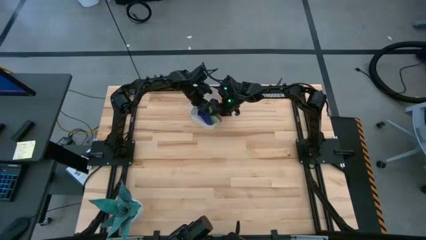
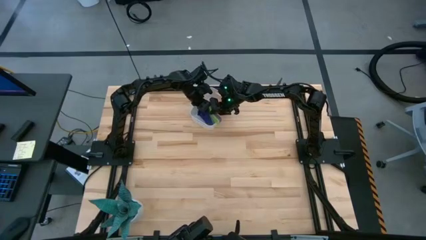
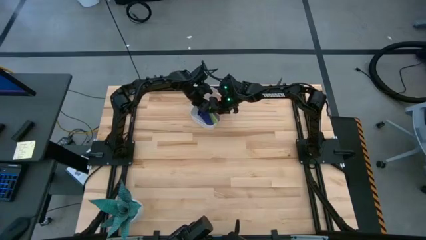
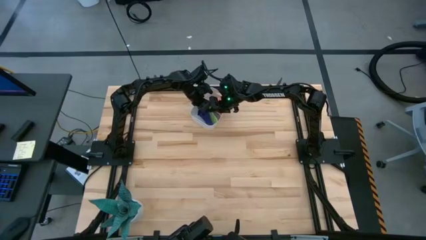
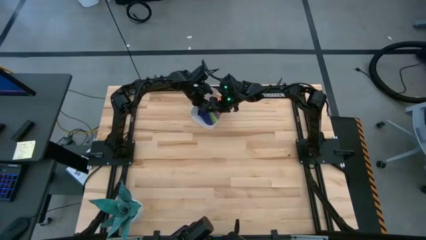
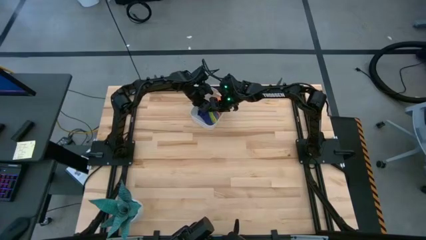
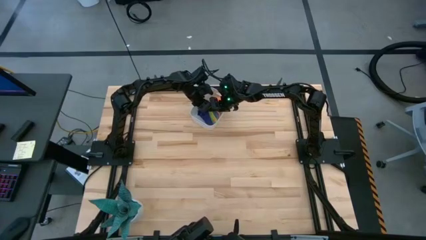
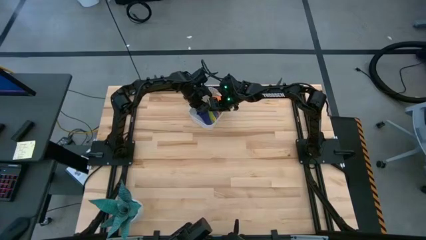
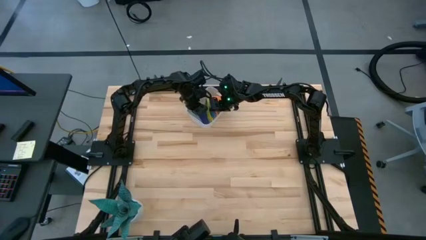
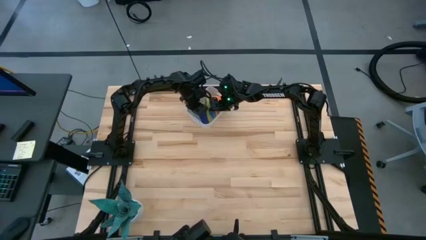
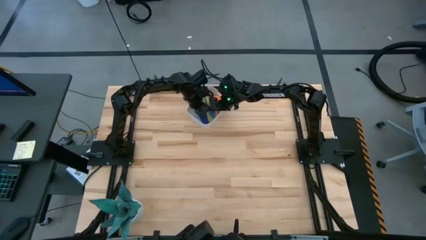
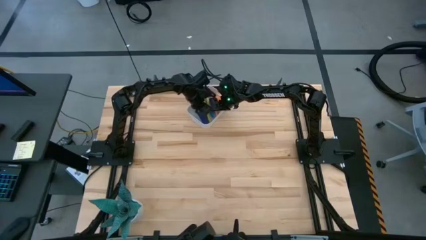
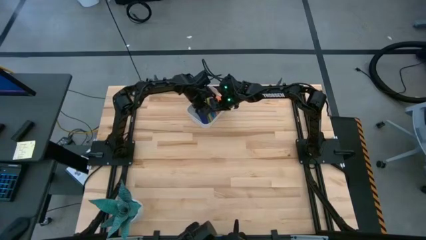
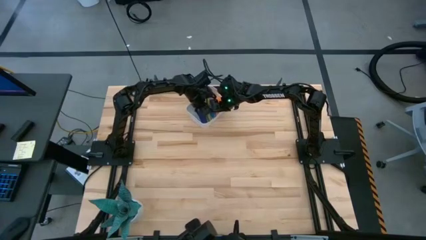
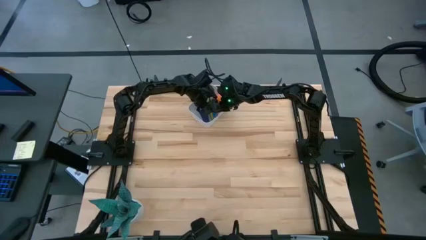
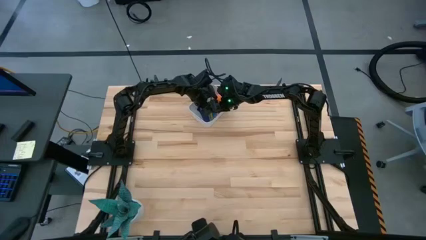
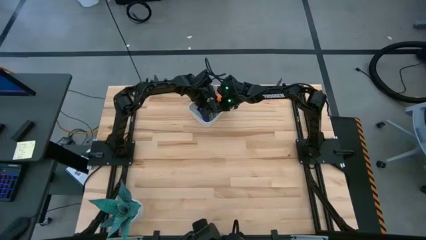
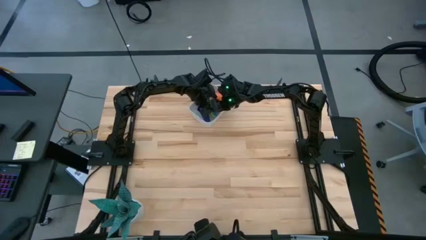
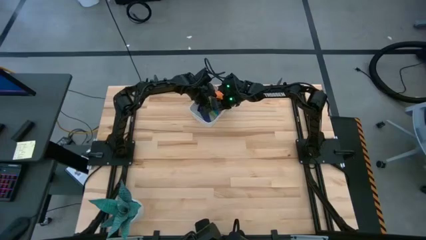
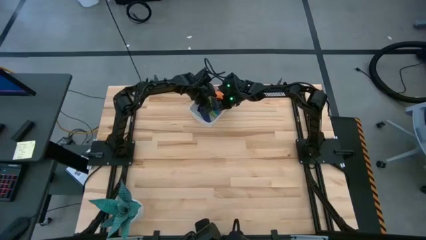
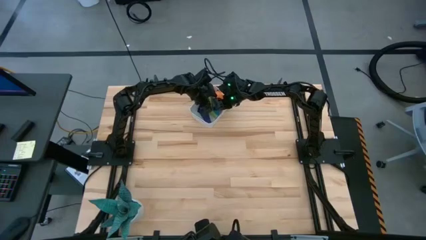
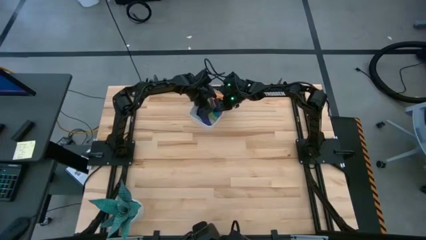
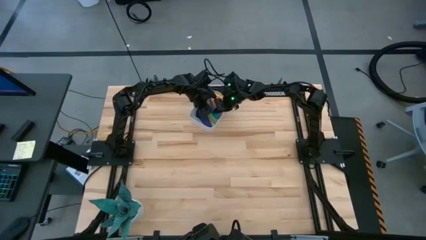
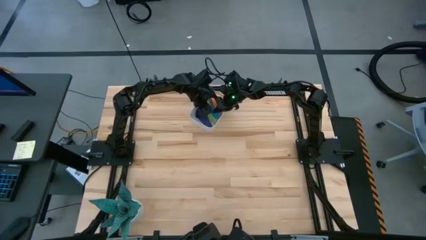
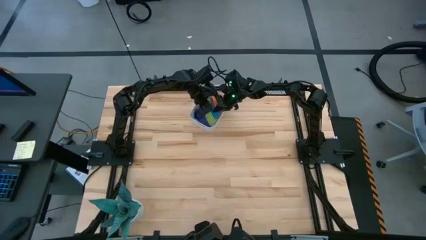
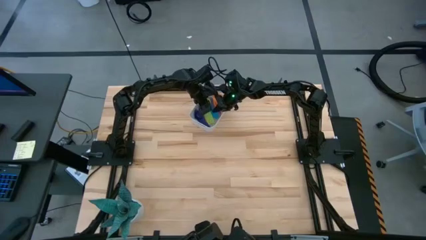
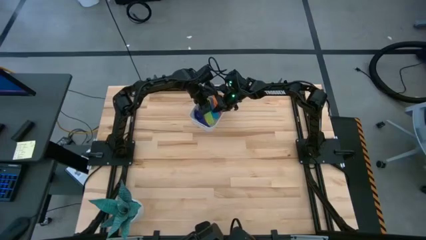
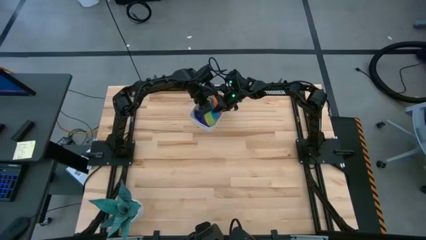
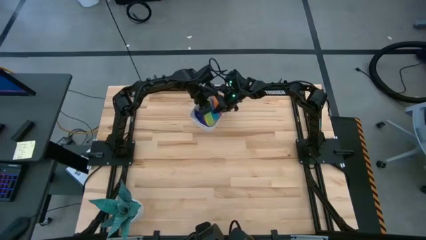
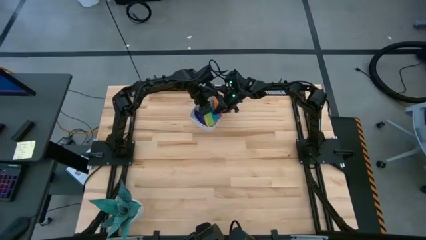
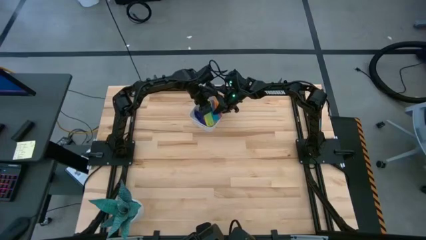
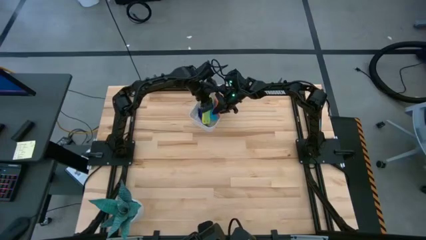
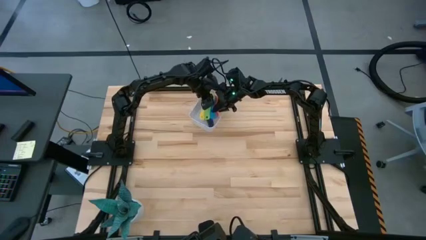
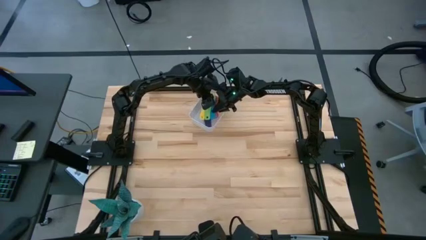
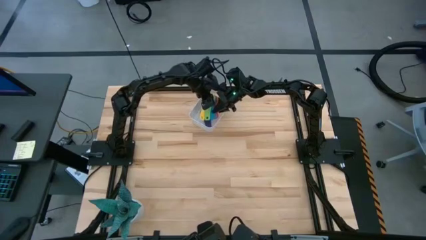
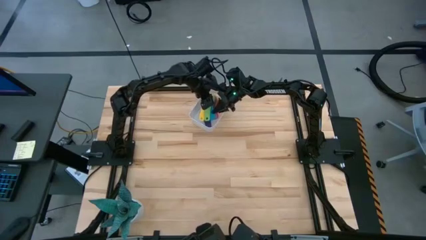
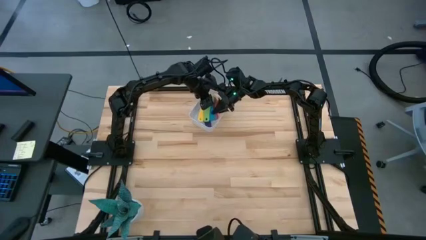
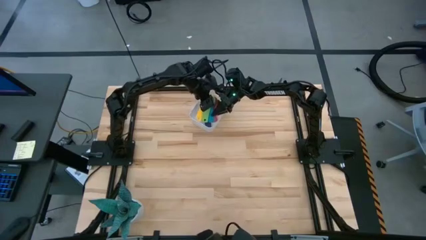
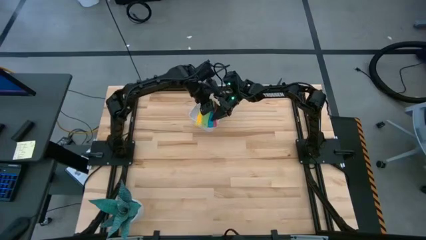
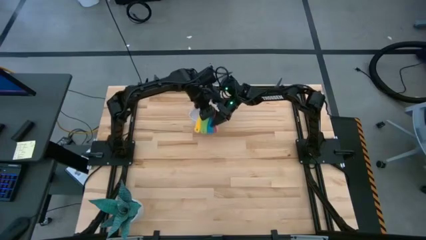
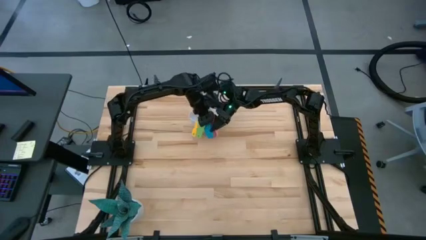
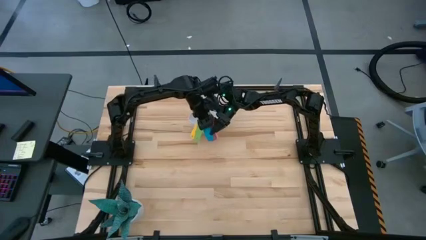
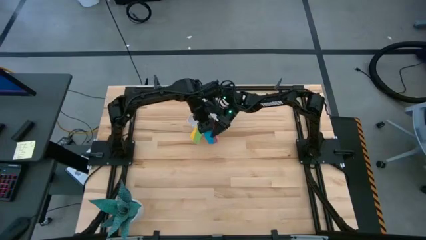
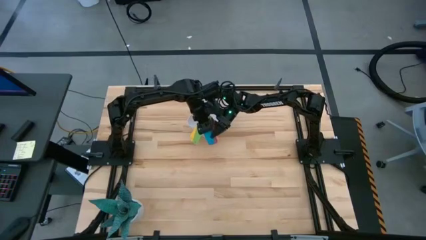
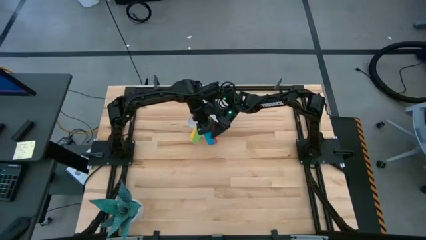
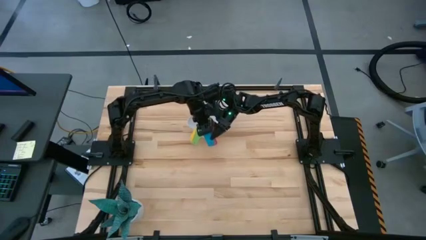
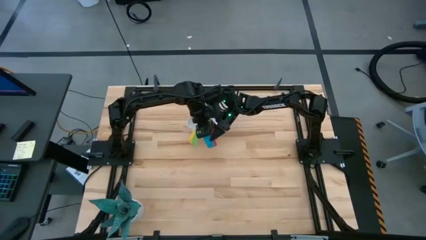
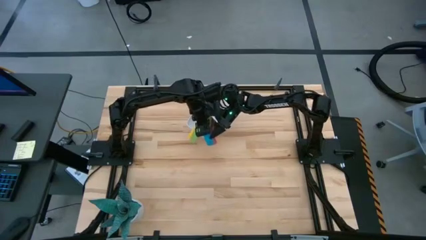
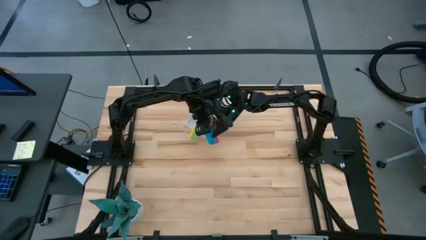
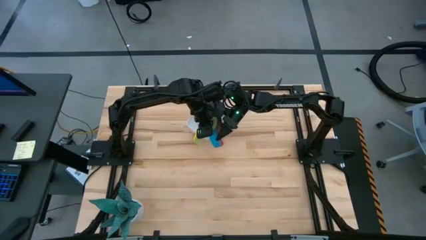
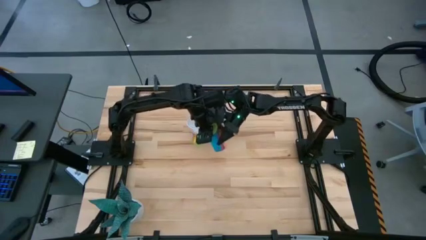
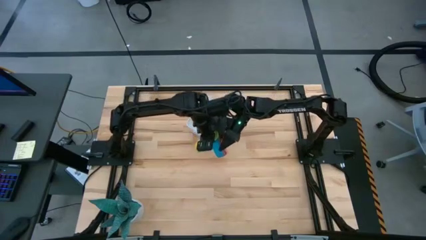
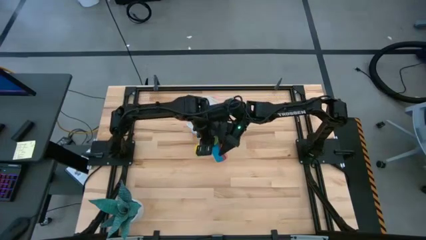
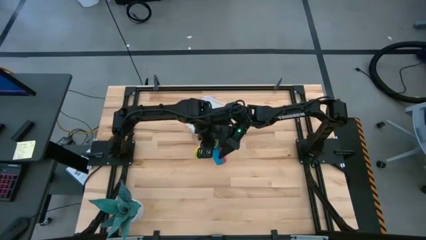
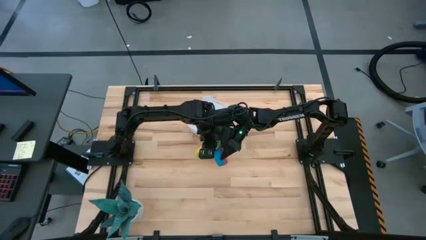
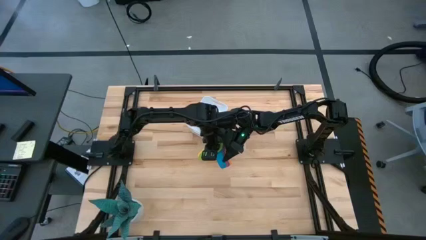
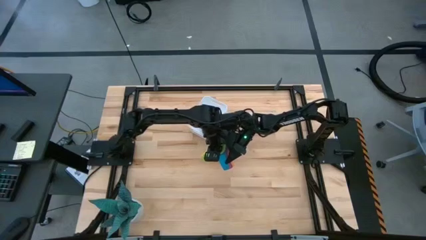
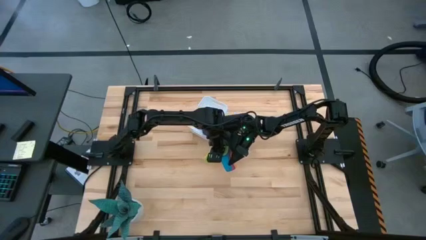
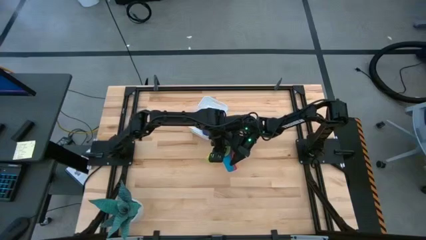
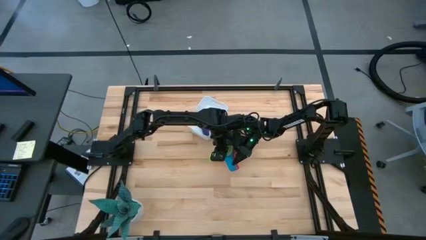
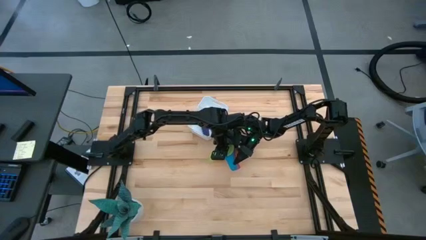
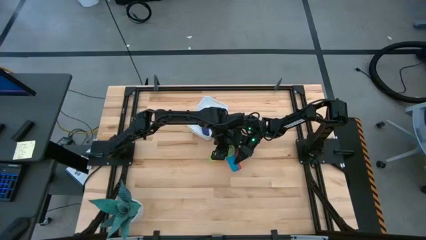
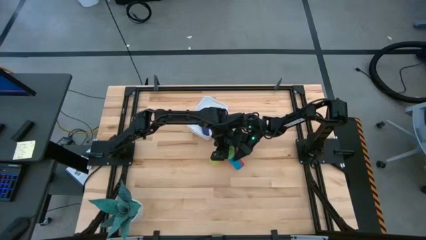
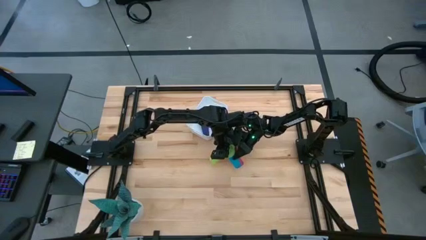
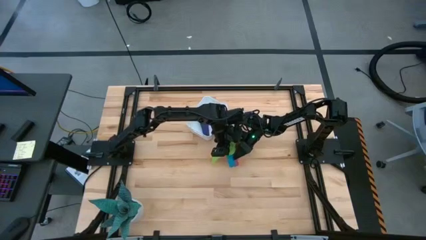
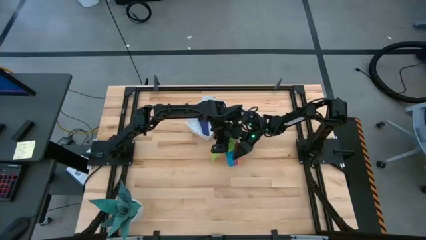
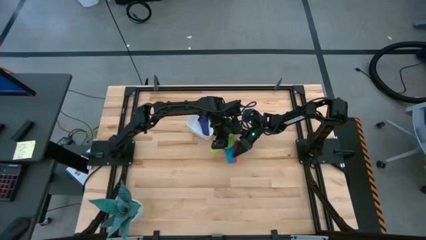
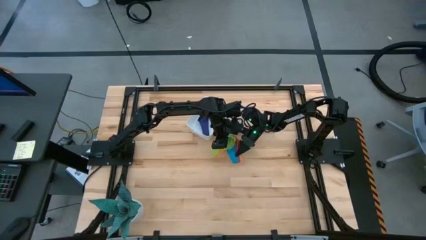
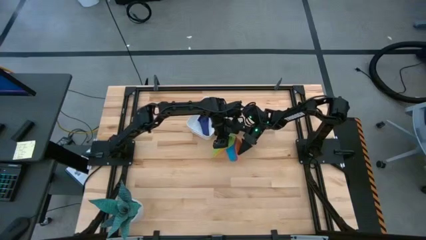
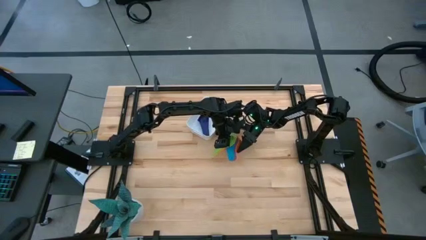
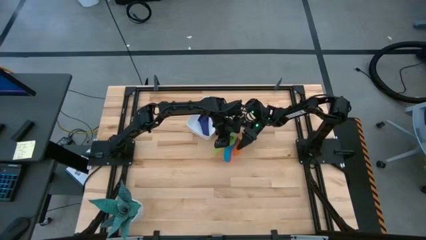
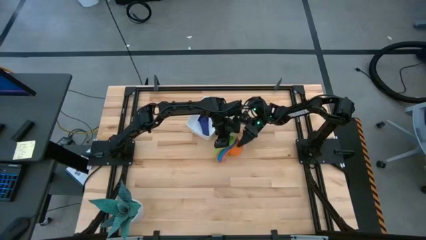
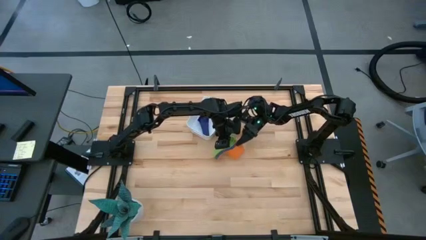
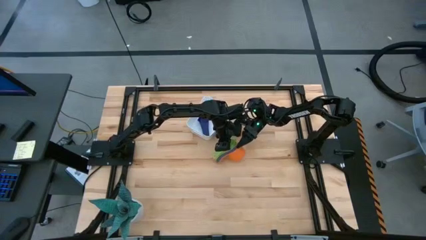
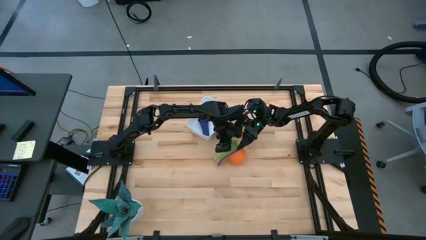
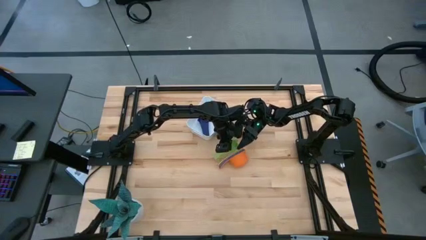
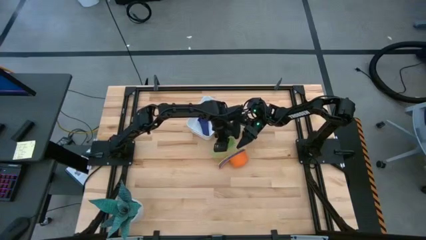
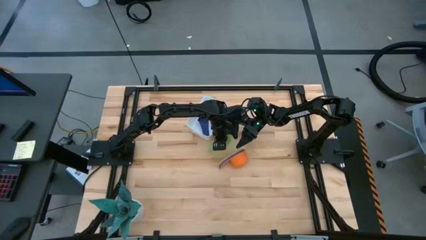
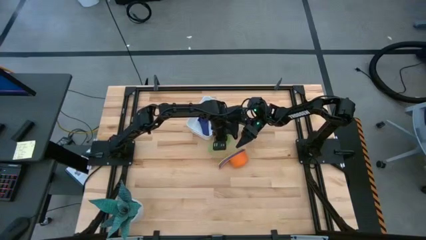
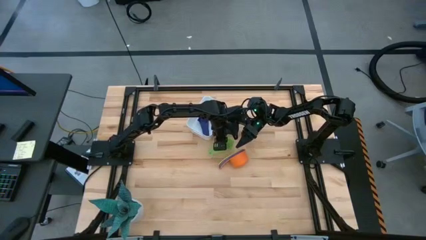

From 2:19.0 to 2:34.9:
Task: Nest measuring cups in basket
Remove the stacked measuring cups from the white bin
